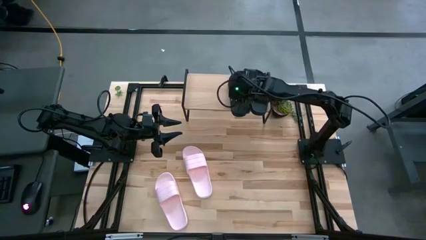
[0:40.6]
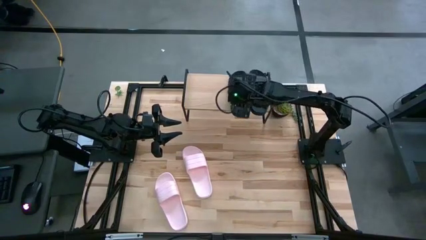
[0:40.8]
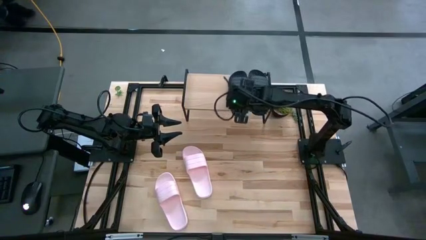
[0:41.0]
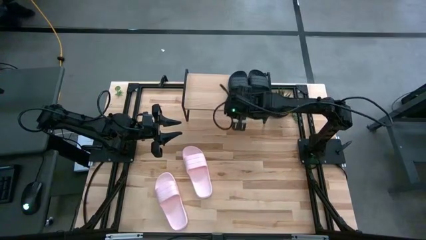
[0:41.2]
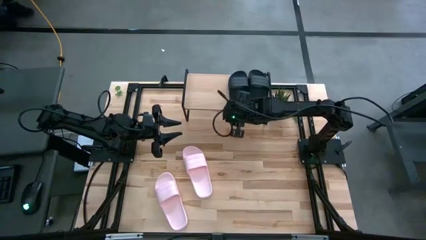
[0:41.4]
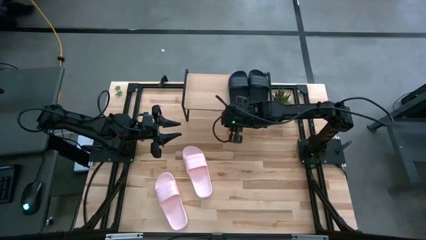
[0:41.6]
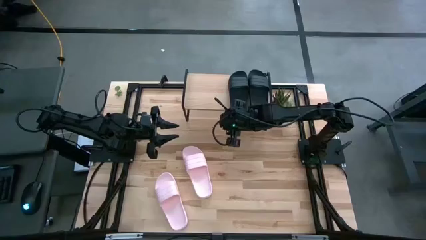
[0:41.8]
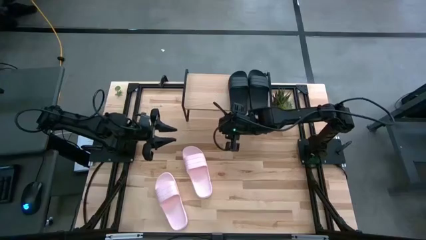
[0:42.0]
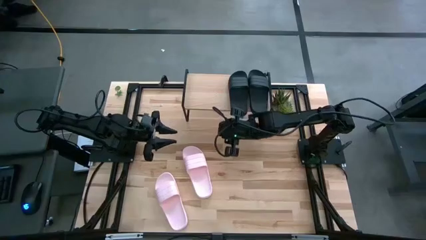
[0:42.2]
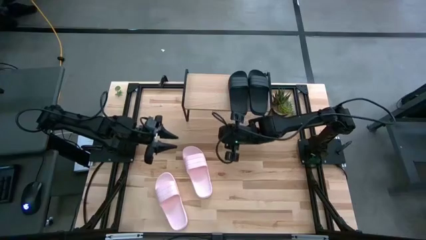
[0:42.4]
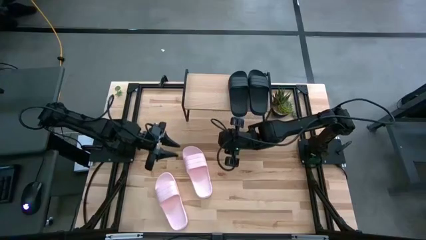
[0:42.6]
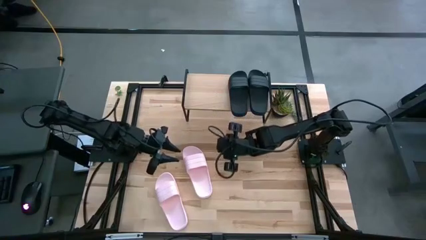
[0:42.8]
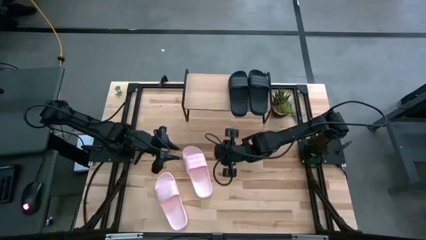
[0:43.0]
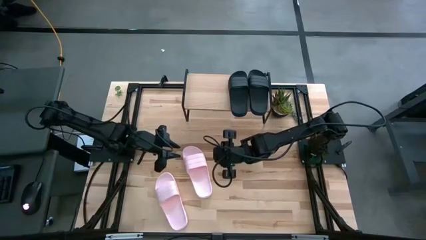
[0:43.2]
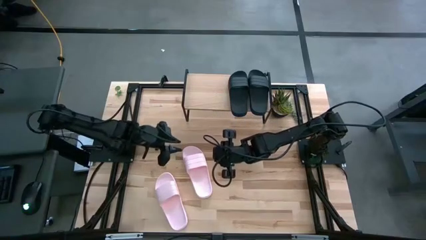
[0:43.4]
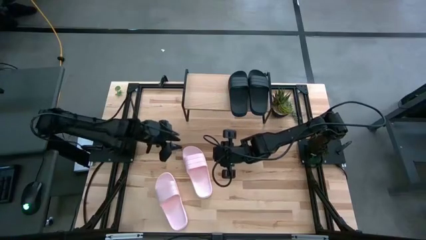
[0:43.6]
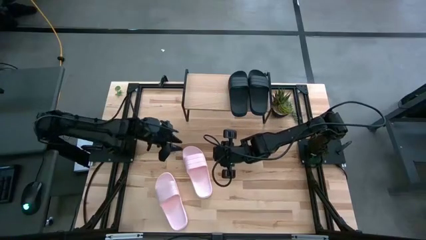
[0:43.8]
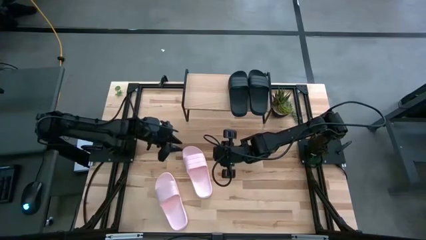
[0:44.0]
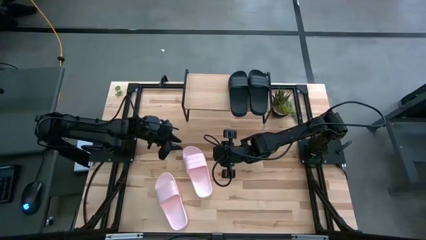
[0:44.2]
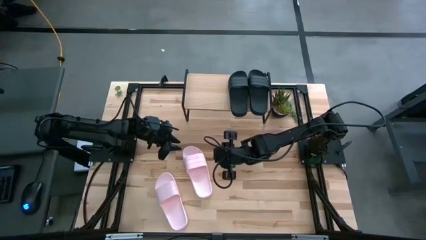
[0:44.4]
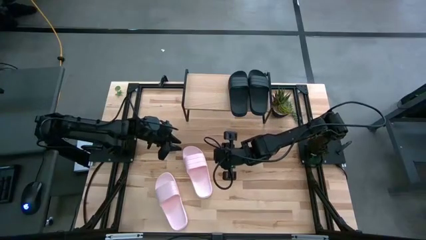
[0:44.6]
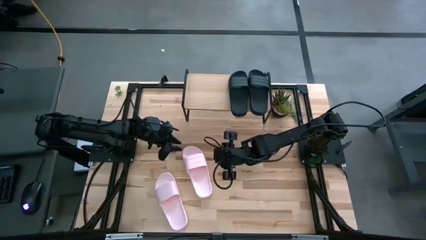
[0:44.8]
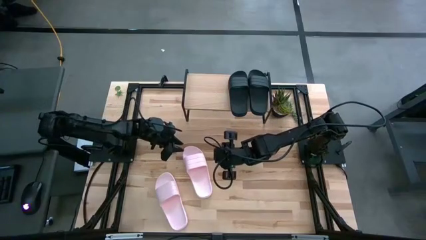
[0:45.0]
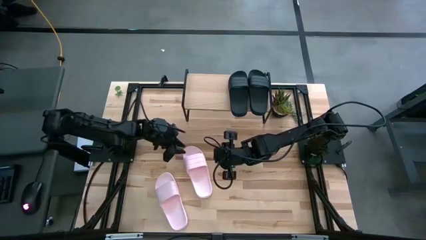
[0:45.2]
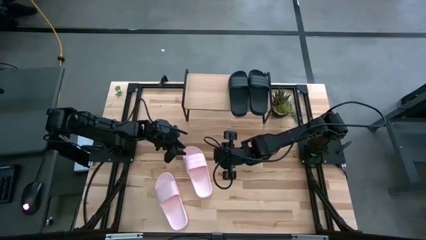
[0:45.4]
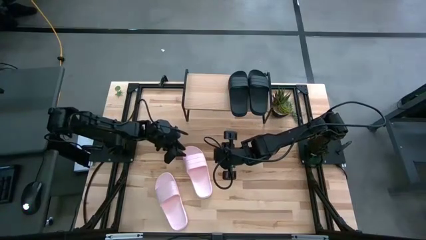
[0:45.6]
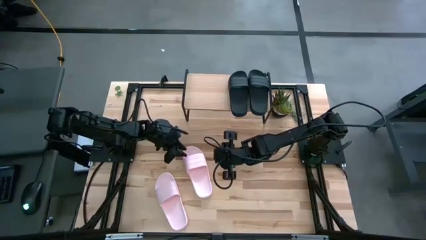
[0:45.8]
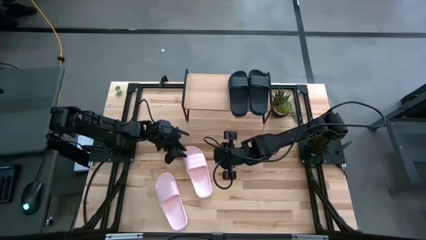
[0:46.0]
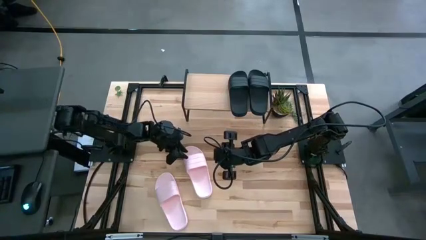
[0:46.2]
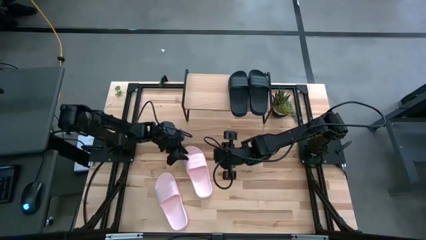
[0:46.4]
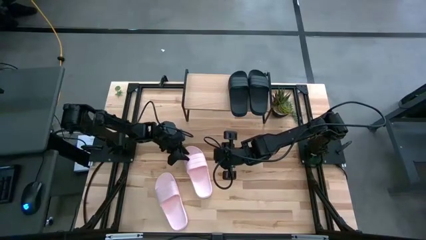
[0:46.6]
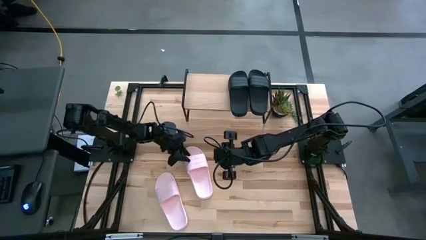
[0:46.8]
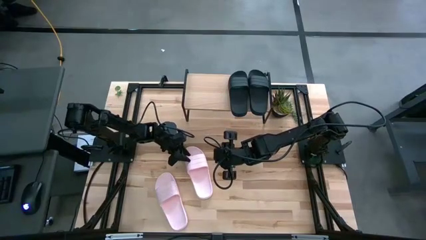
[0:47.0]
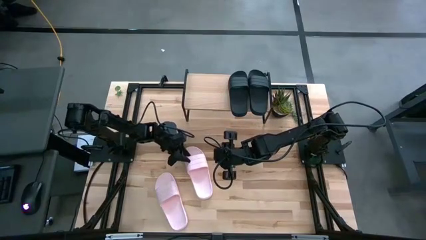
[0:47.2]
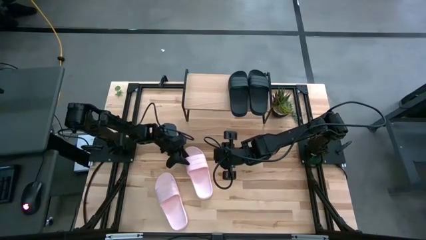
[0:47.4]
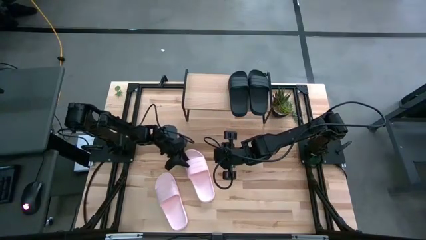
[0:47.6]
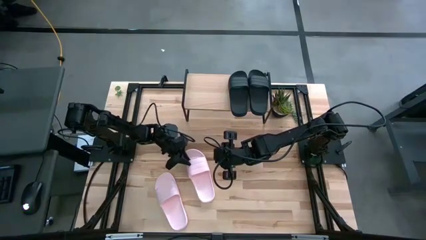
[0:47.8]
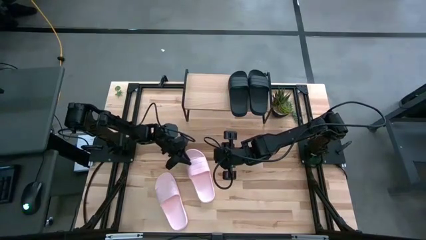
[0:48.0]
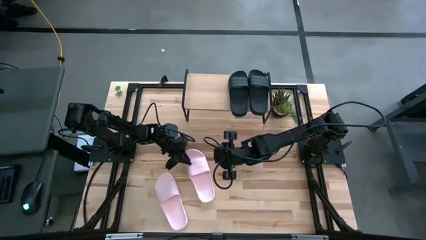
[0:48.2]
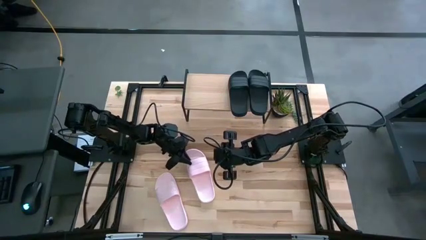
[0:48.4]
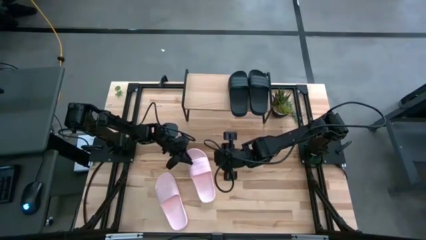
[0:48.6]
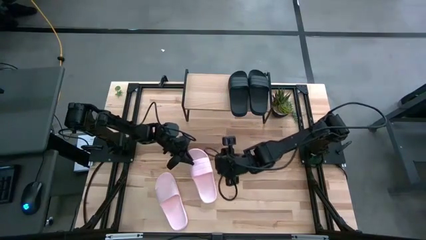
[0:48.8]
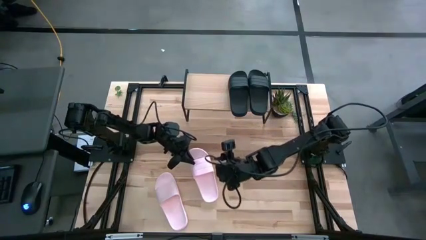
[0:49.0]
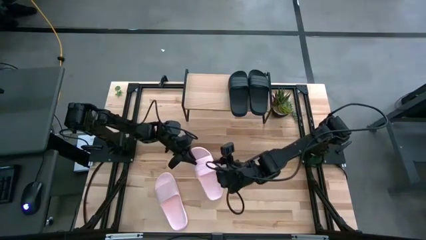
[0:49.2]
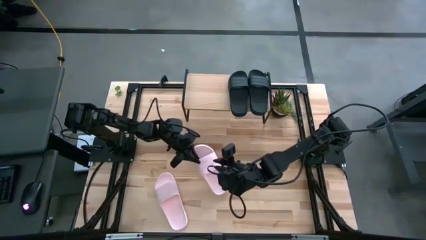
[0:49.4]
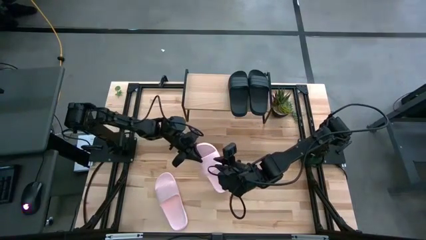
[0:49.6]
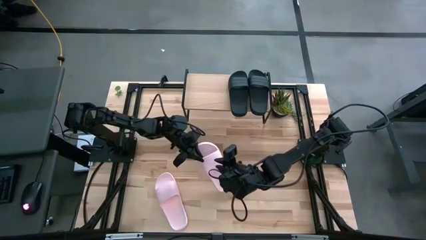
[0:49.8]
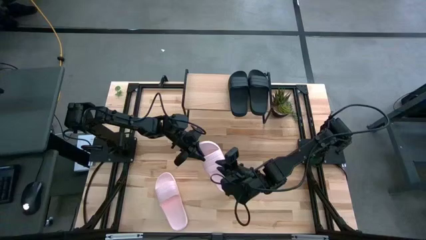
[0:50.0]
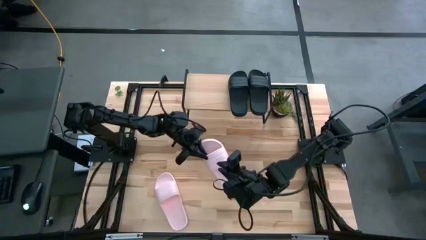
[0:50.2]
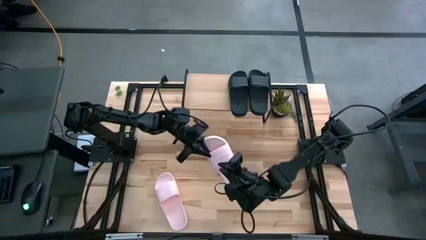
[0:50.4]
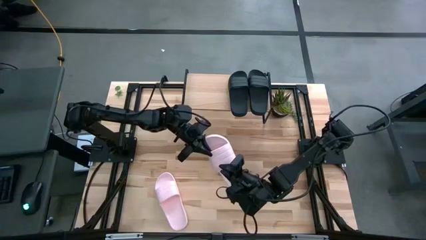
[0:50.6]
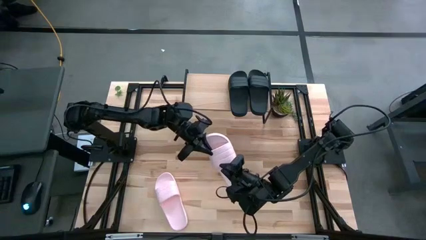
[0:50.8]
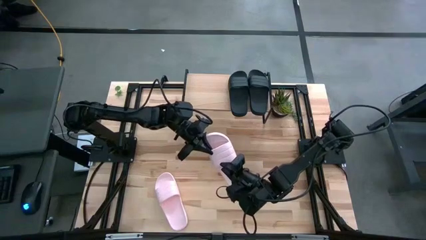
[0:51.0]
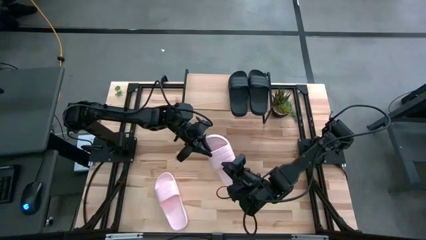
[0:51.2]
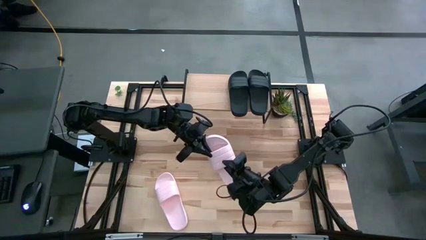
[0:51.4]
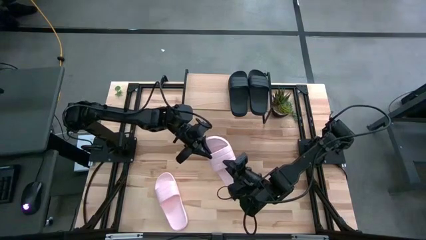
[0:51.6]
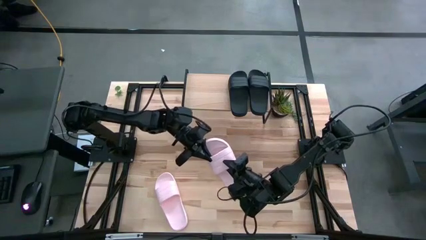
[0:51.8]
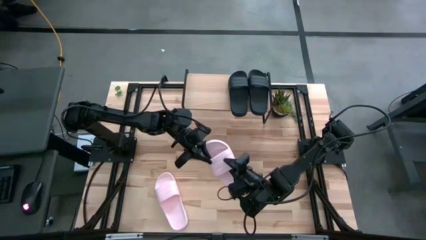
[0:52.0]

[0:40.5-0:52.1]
Task: Pick and place slides into the shelf
Put the right pink slipper on the shelf
